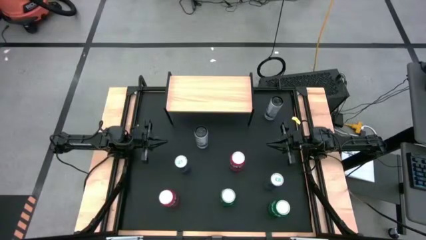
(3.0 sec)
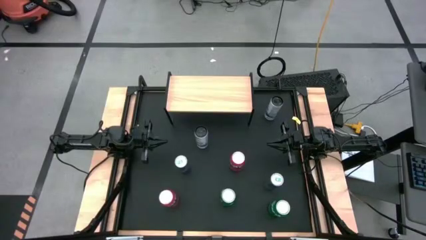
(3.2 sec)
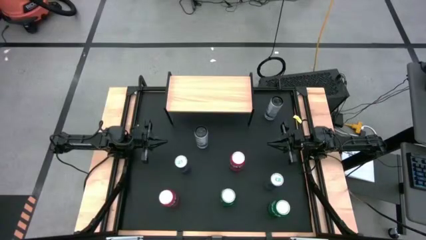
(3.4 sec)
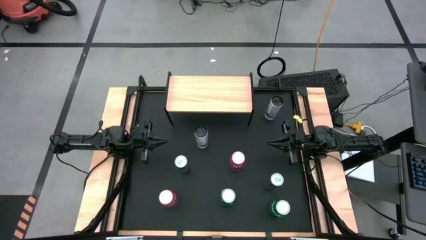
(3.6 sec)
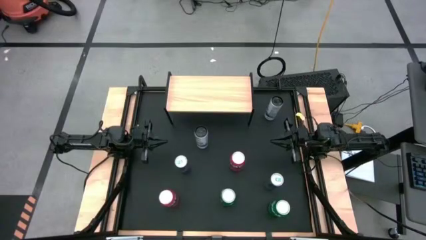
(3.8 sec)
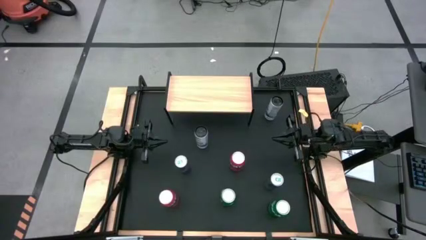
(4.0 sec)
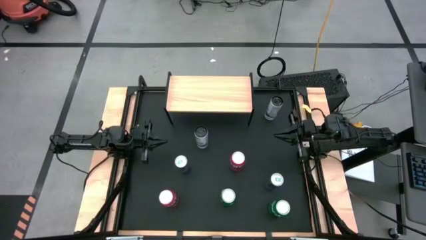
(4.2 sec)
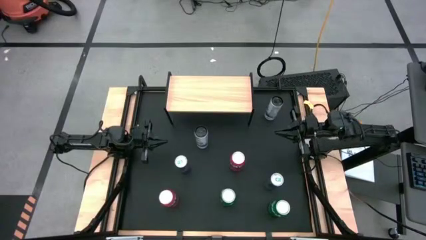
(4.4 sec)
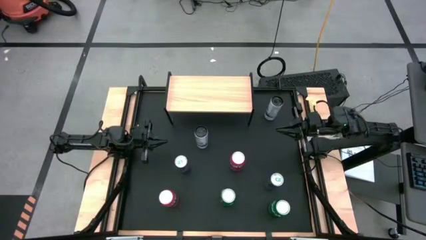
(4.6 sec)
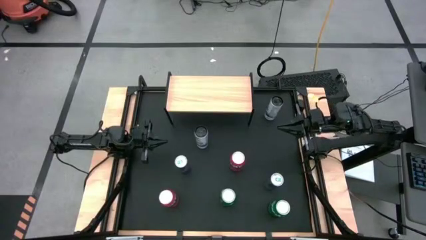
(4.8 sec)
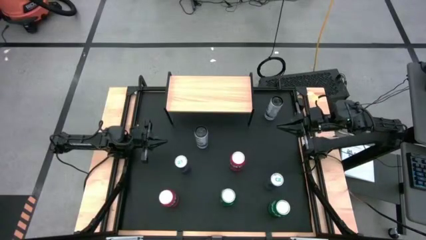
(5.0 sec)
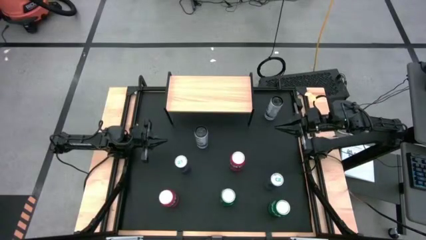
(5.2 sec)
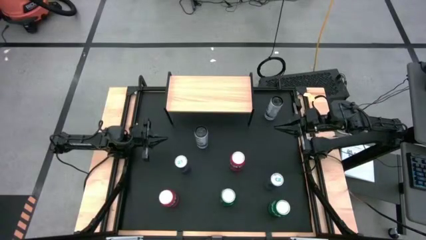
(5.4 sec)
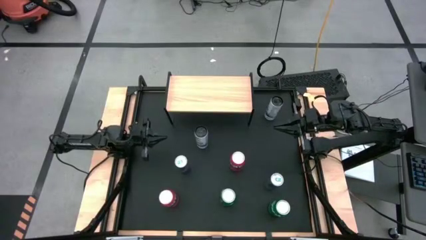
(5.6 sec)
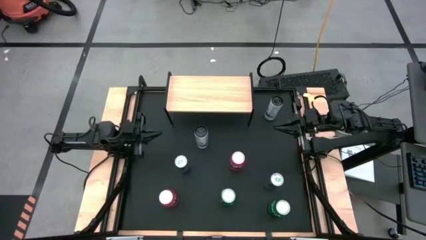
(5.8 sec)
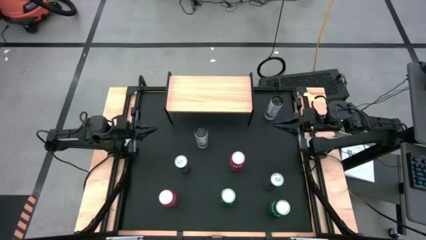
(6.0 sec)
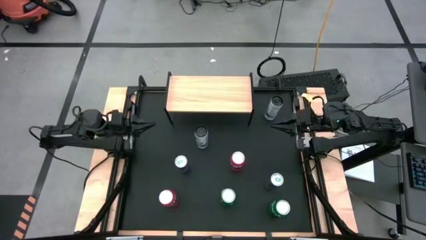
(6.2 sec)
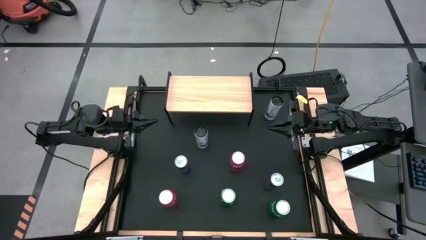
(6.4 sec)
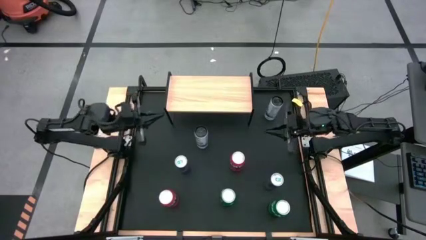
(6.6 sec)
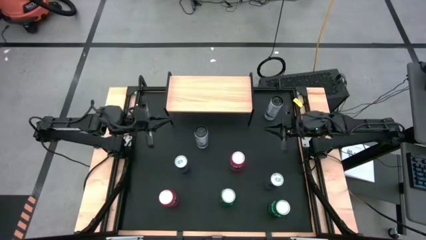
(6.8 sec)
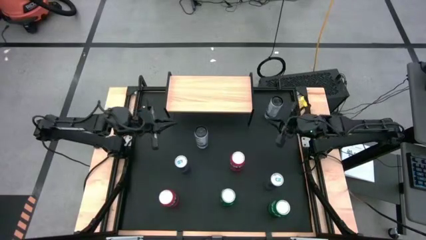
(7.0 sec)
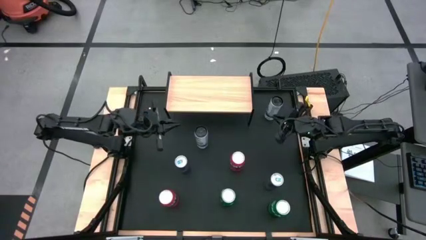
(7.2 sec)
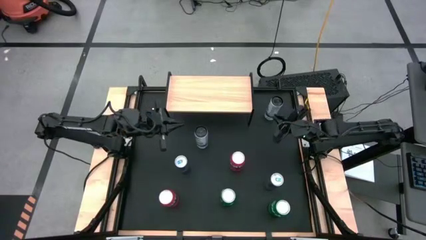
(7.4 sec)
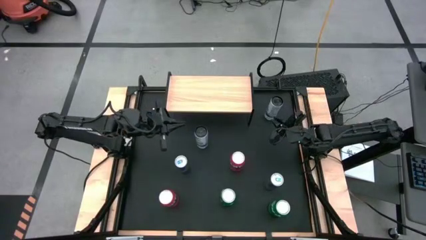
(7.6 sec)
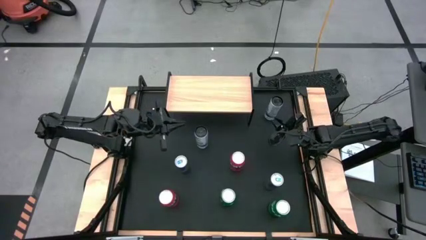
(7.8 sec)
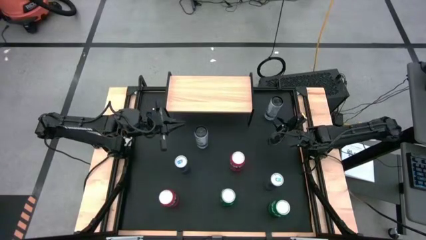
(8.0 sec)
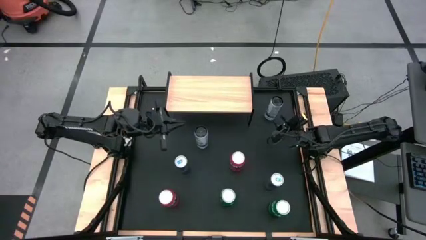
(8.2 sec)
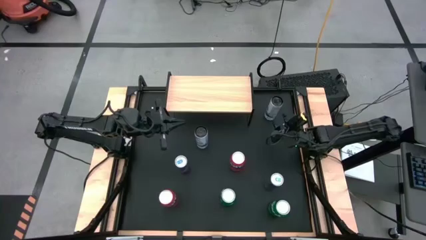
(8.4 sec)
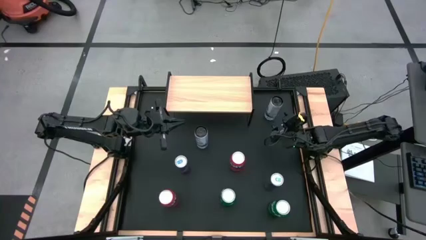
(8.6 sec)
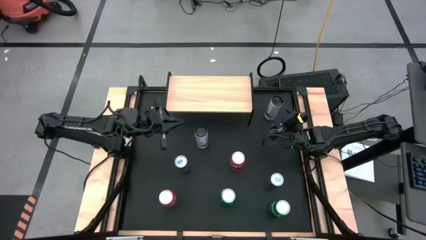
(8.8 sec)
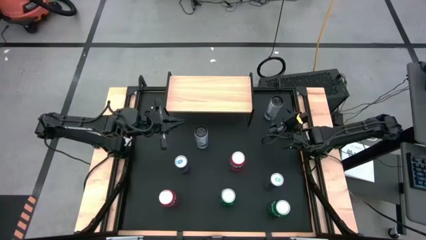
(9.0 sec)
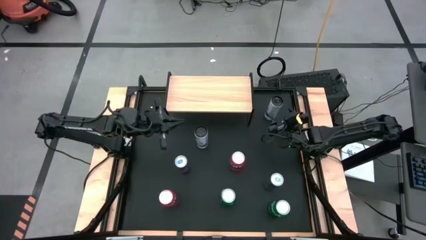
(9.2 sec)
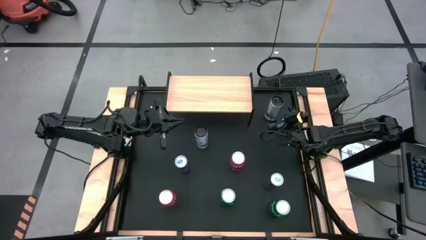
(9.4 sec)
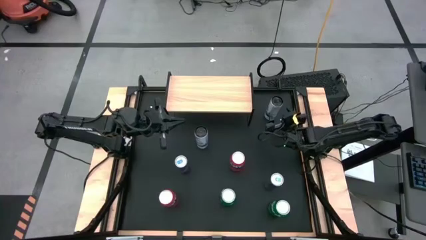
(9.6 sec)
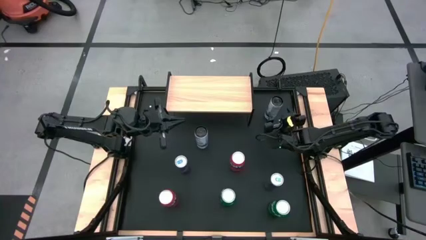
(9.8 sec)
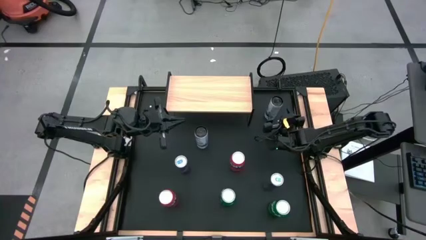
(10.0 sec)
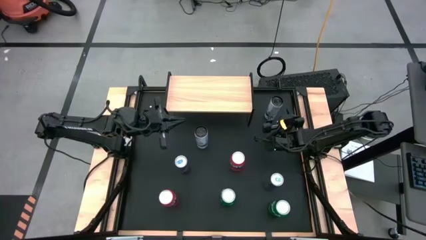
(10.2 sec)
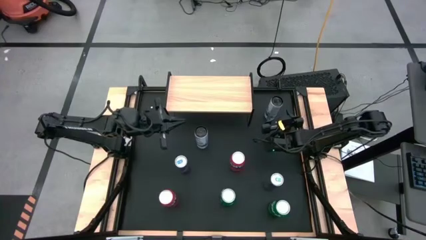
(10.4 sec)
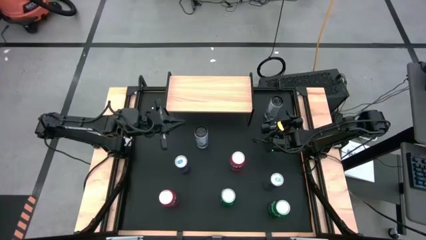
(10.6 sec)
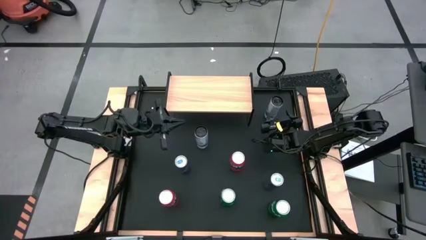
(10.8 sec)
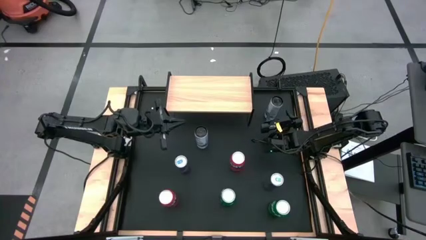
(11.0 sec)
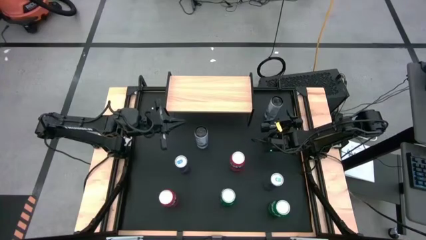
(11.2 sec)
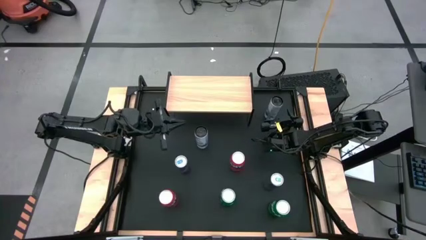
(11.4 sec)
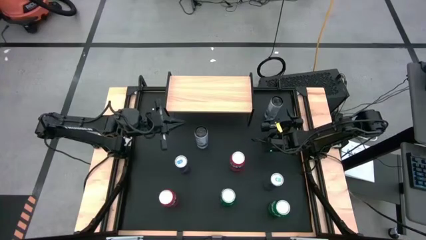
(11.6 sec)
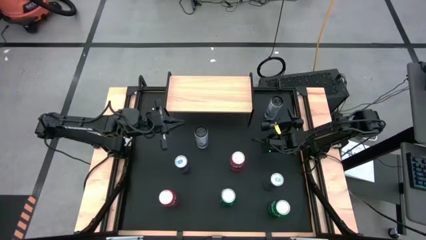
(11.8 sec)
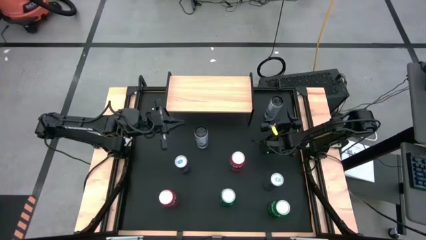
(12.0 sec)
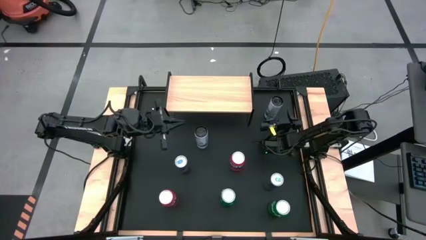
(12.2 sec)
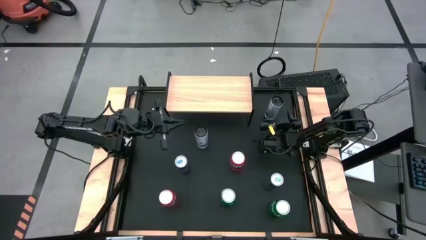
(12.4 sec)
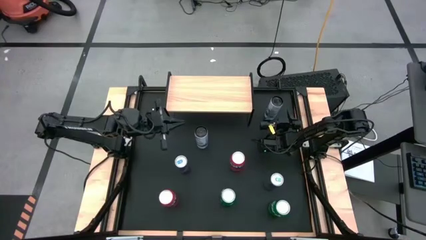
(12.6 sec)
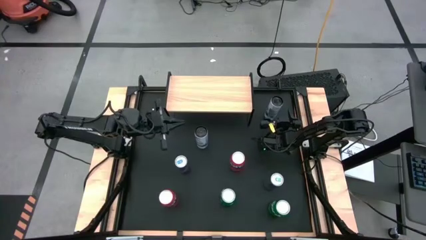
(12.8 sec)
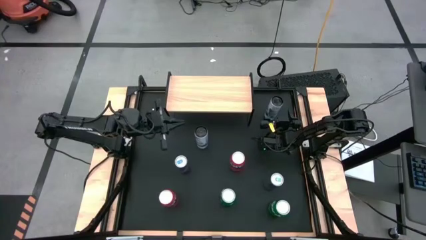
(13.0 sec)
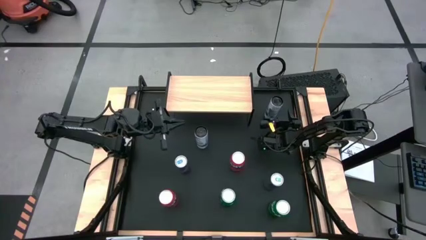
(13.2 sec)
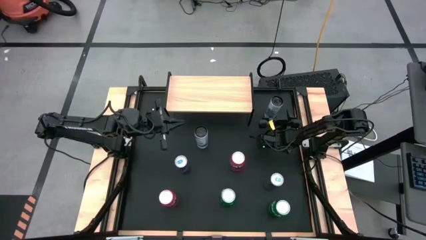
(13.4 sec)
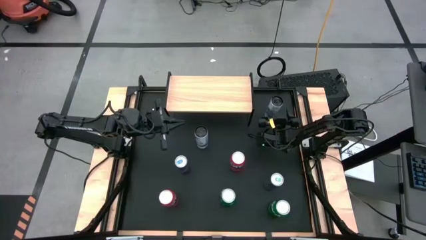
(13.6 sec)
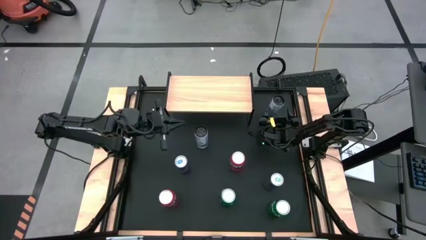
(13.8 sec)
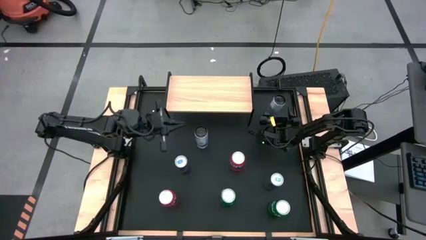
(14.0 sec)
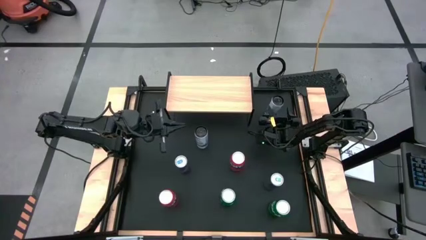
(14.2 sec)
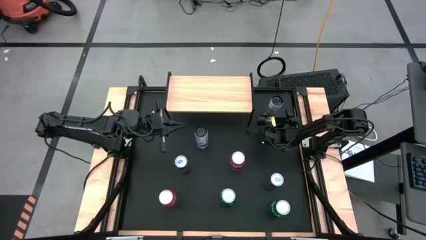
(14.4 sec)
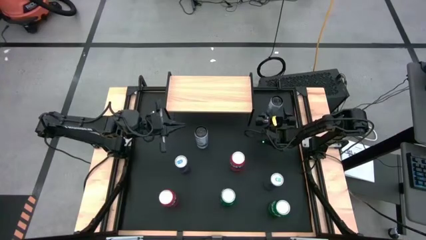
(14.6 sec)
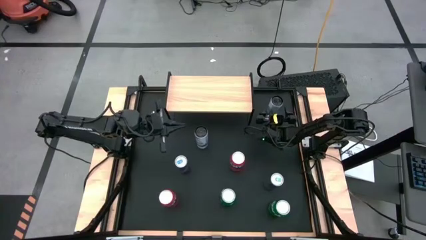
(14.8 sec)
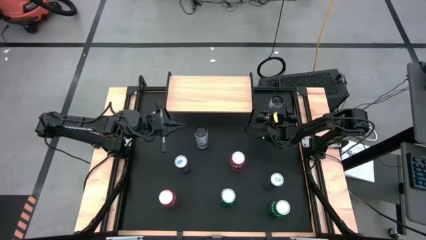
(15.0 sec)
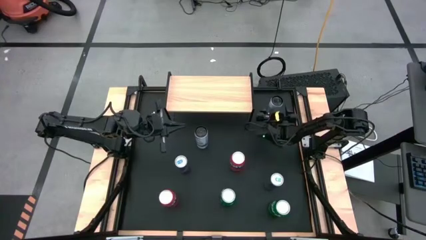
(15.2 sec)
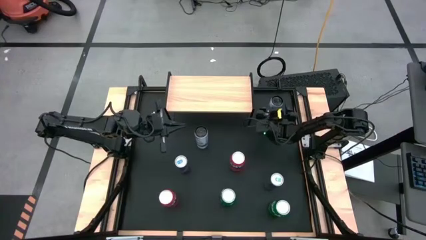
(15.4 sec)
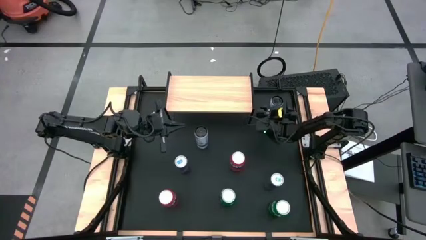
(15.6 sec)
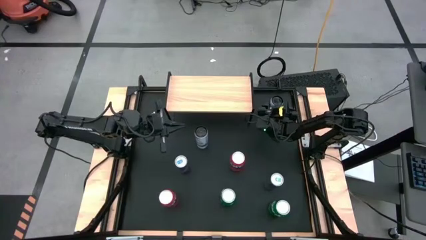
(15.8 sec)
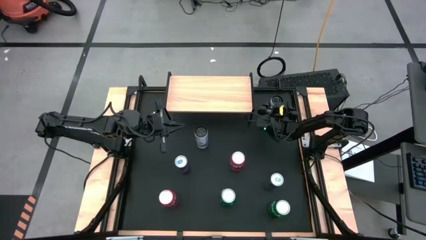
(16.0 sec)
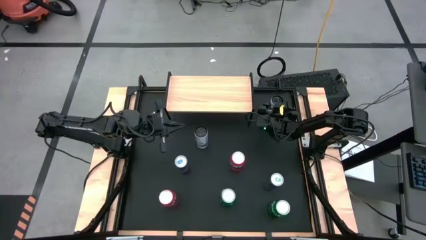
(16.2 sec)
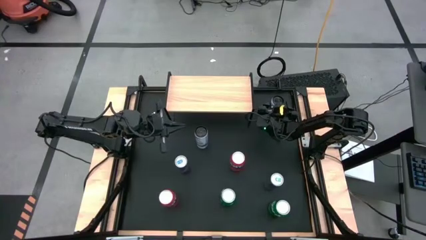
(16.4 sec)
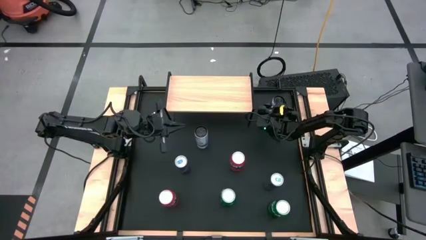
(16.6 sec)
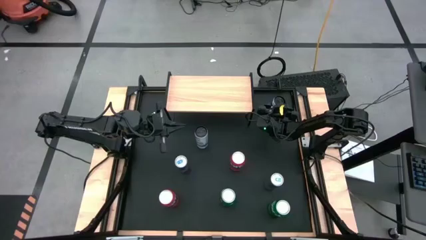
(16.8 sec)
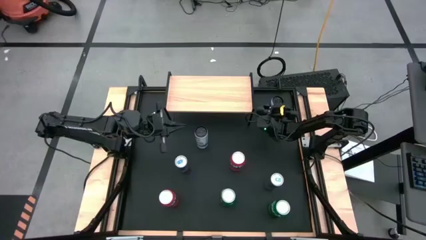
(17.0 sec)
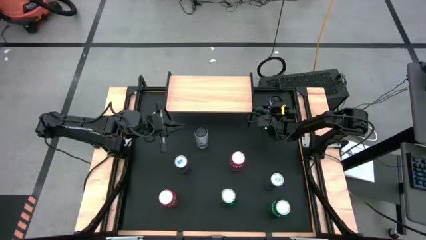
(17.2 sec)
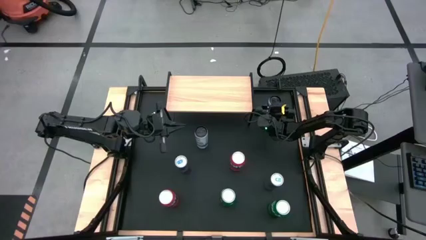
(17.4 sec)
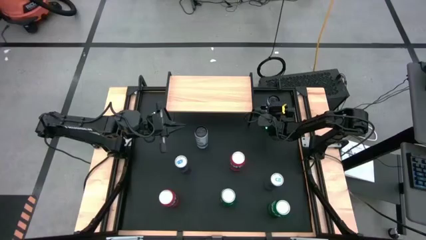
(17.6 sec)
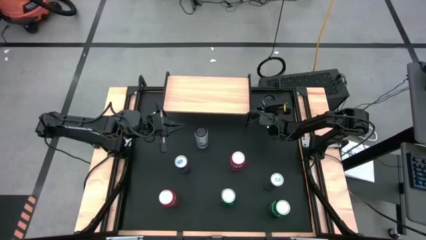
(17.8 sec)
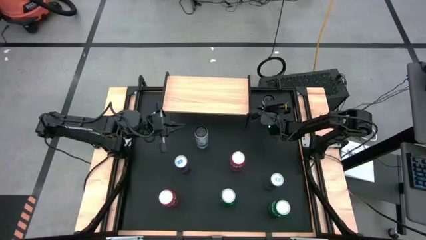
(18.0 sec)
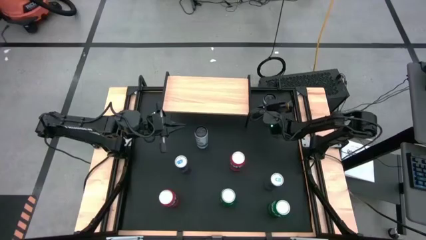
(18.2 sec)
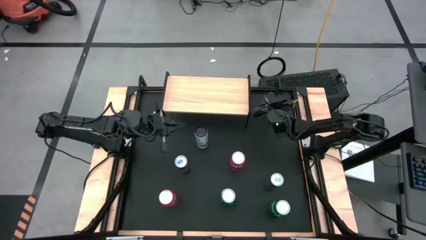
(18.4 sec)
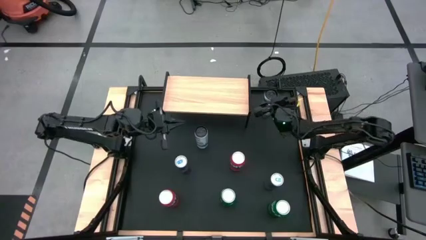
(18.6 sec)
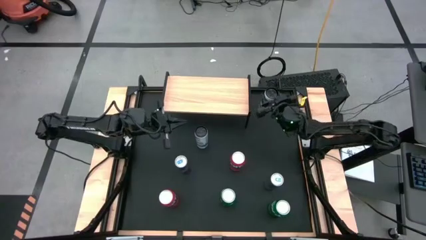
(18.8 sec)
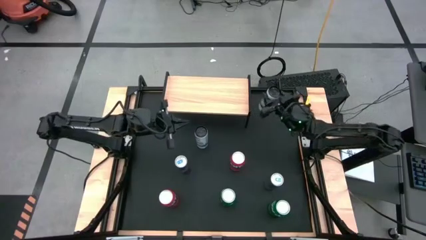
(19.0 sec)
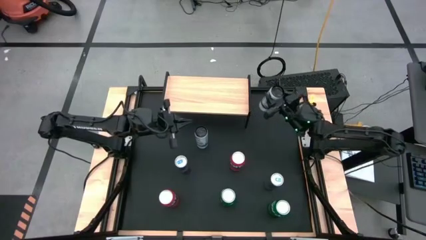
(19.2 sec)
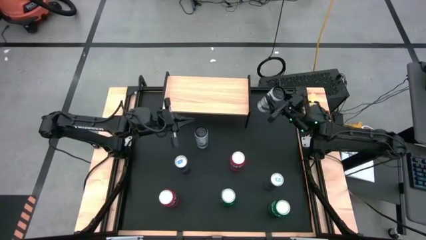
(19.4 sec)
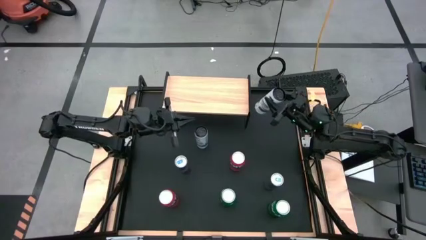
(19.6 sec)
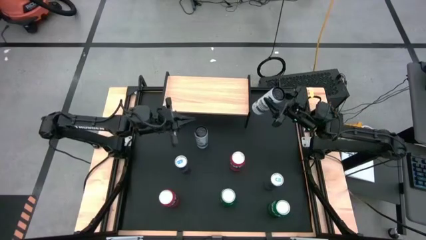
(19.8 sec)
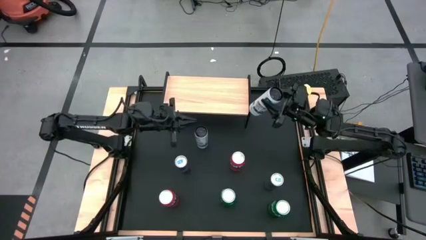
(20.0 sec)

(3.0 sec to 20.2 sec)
Task: Place canned beverage on shelf
Put the right white-blue soda can on the shelf
